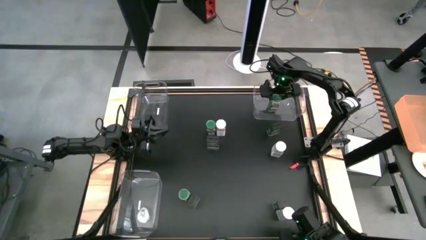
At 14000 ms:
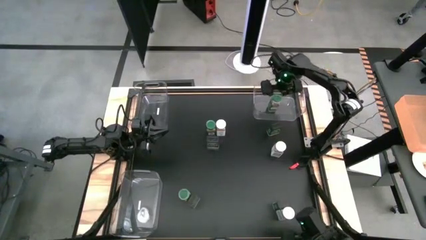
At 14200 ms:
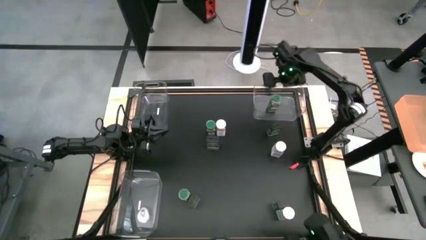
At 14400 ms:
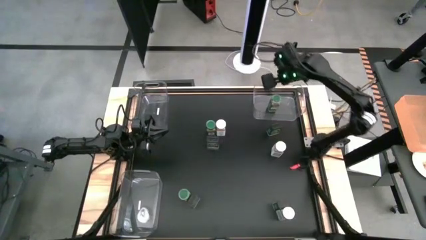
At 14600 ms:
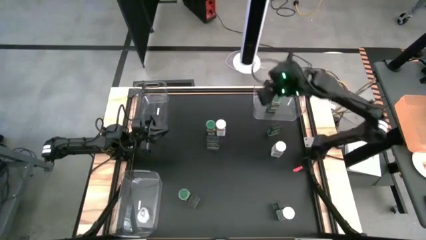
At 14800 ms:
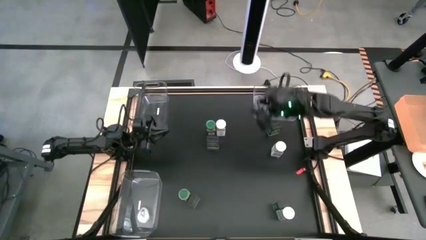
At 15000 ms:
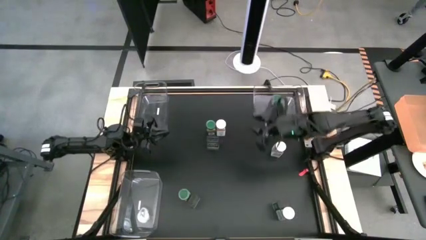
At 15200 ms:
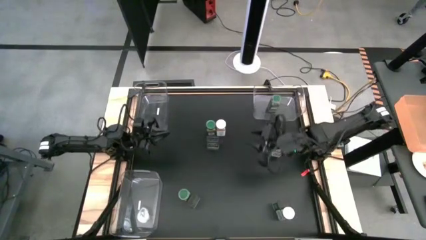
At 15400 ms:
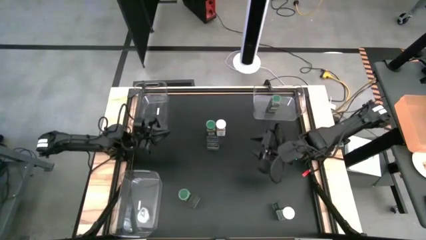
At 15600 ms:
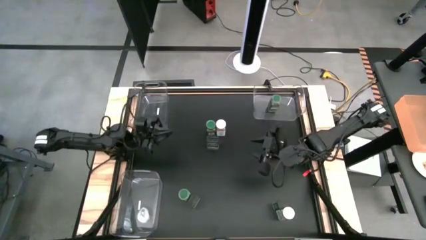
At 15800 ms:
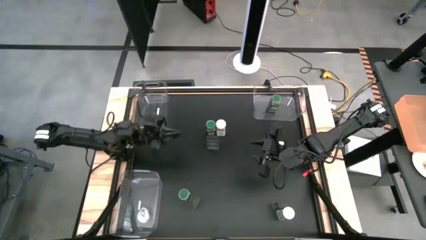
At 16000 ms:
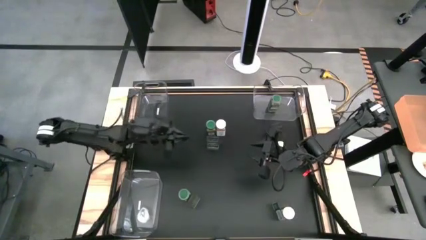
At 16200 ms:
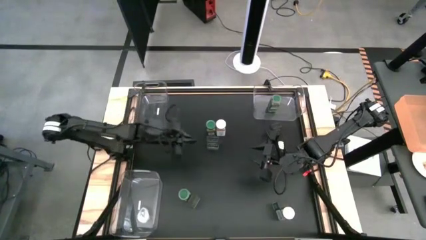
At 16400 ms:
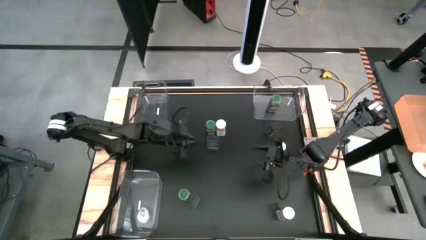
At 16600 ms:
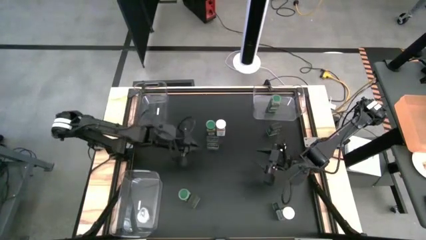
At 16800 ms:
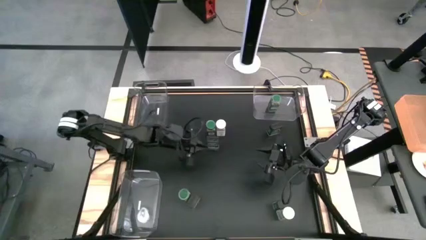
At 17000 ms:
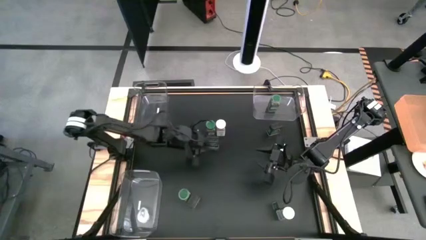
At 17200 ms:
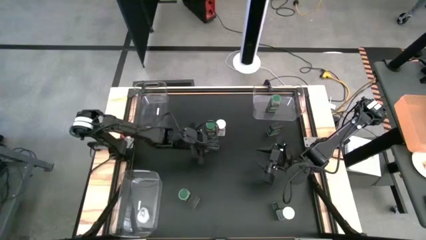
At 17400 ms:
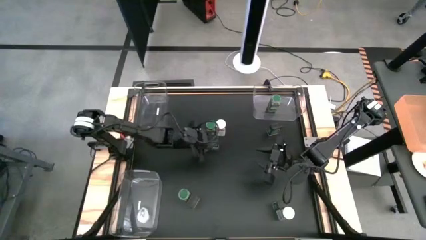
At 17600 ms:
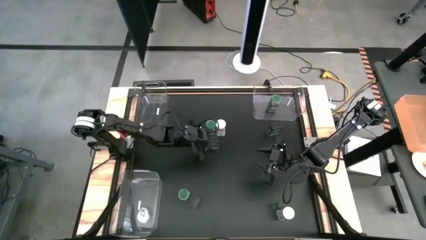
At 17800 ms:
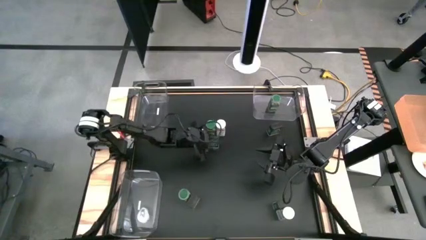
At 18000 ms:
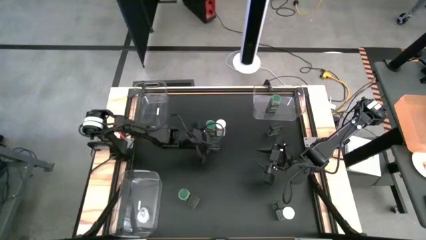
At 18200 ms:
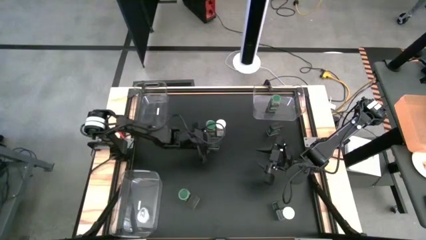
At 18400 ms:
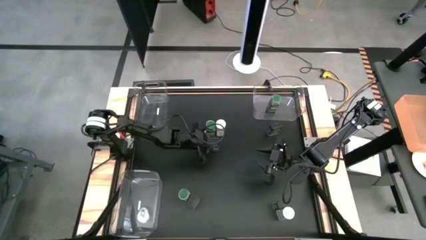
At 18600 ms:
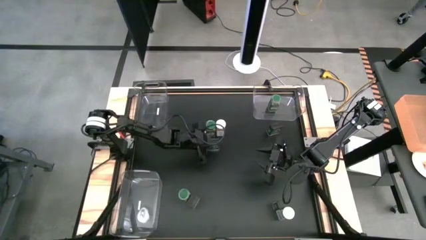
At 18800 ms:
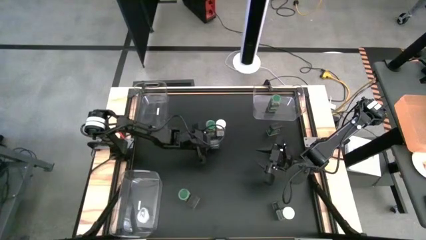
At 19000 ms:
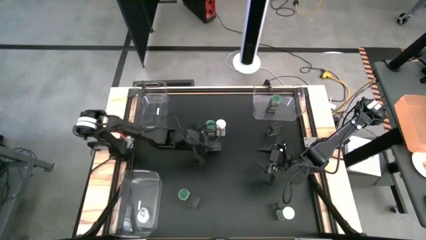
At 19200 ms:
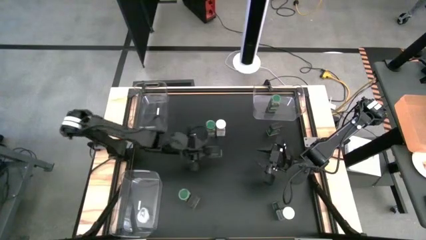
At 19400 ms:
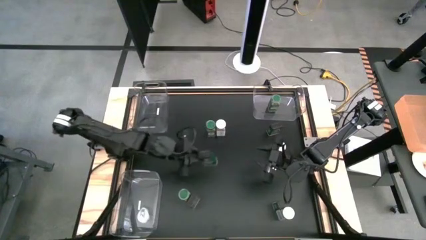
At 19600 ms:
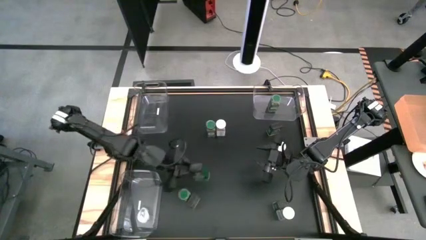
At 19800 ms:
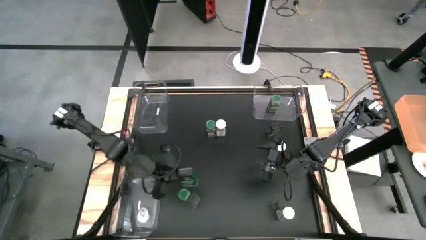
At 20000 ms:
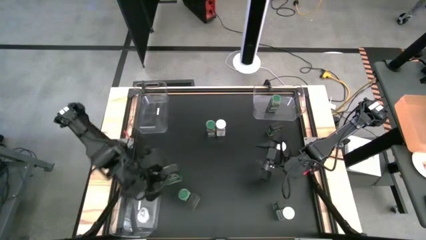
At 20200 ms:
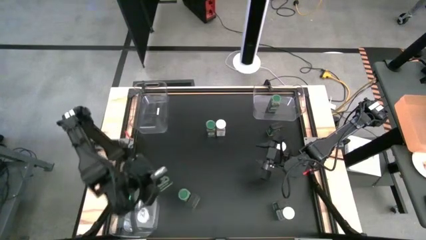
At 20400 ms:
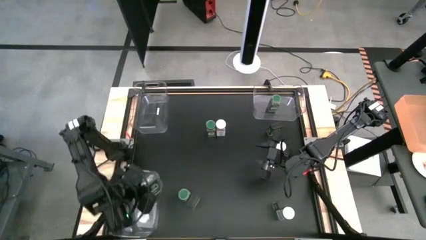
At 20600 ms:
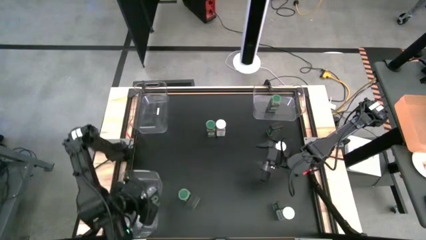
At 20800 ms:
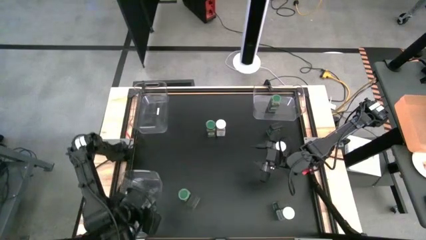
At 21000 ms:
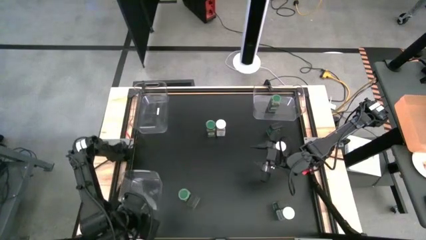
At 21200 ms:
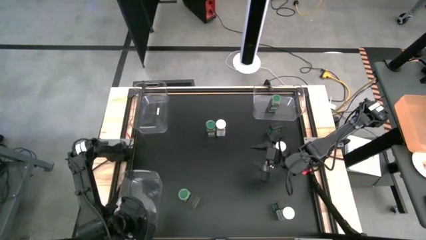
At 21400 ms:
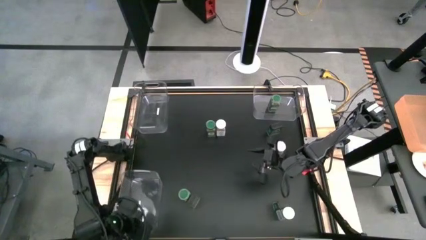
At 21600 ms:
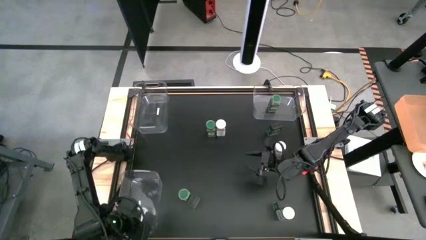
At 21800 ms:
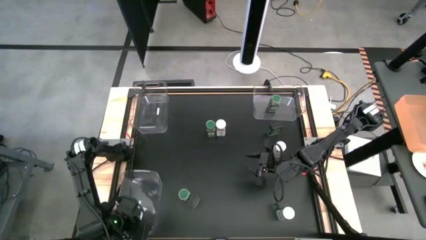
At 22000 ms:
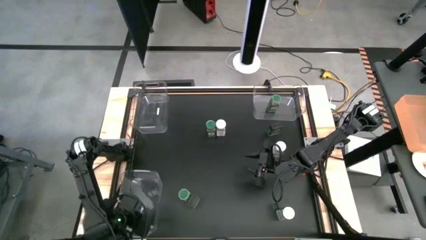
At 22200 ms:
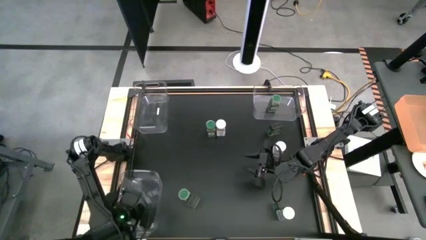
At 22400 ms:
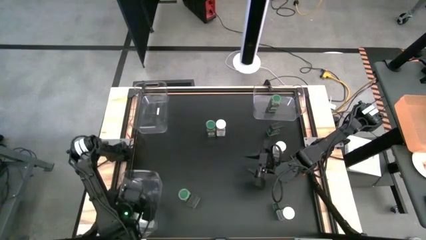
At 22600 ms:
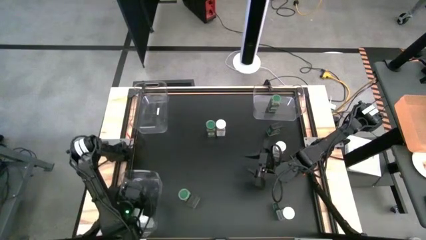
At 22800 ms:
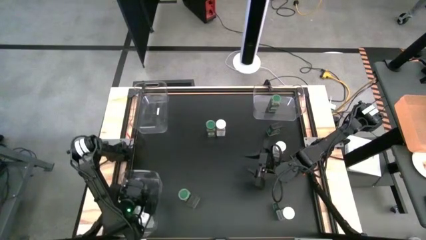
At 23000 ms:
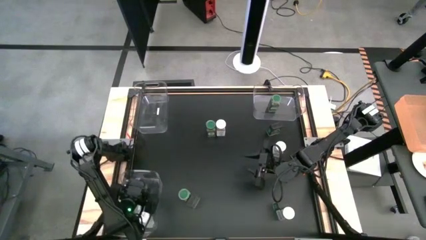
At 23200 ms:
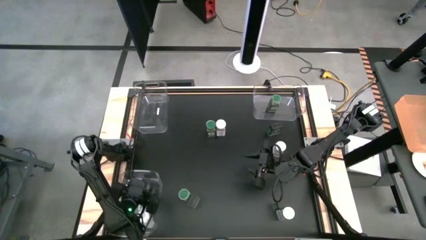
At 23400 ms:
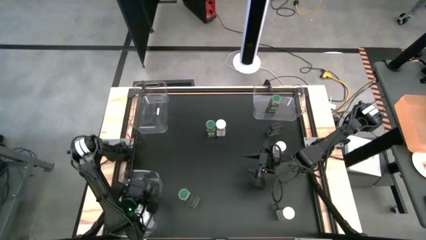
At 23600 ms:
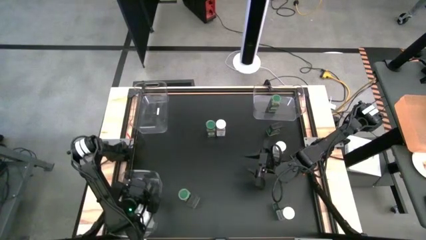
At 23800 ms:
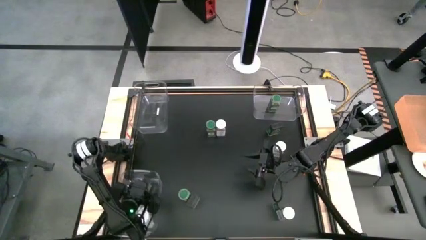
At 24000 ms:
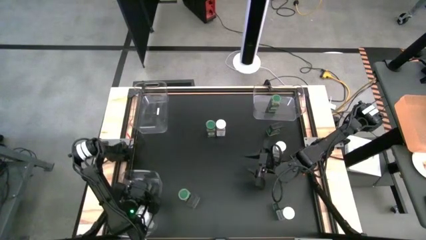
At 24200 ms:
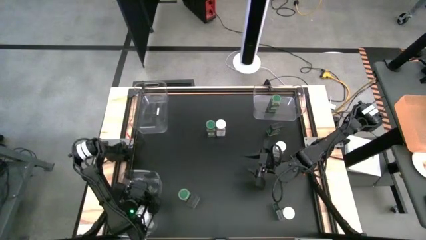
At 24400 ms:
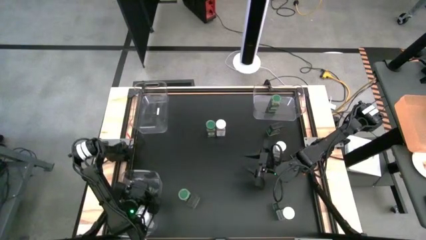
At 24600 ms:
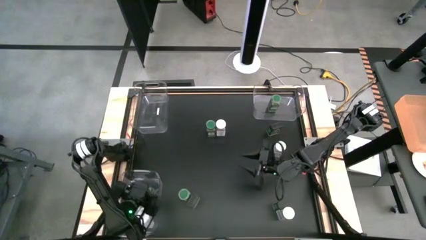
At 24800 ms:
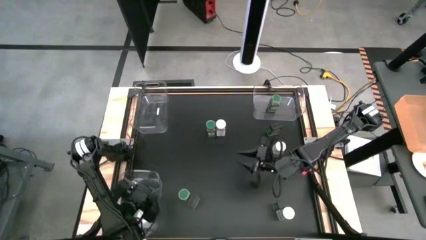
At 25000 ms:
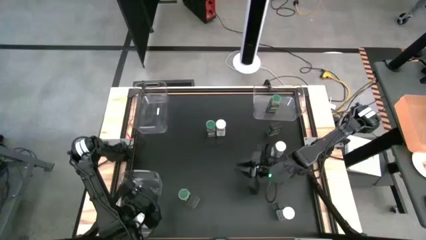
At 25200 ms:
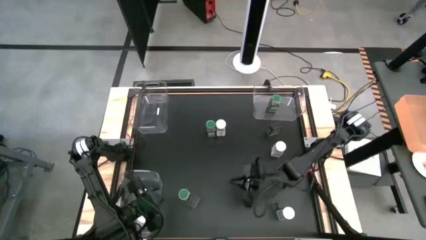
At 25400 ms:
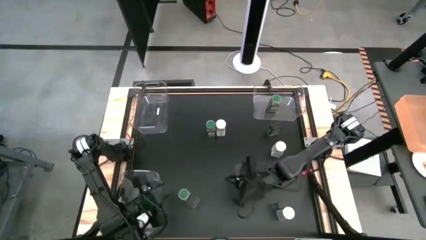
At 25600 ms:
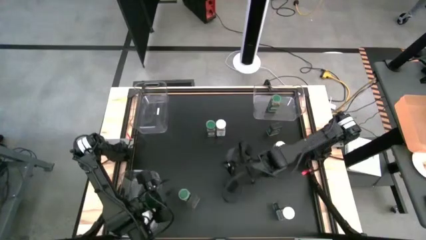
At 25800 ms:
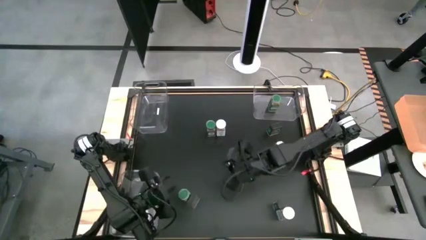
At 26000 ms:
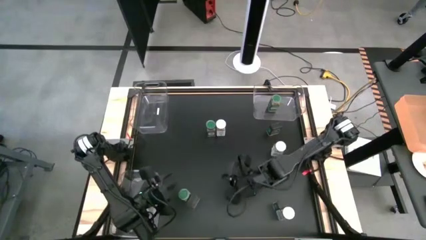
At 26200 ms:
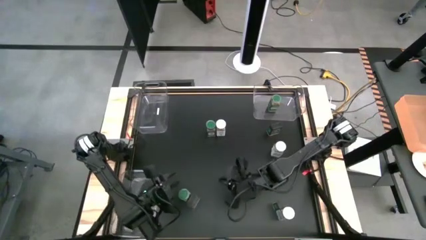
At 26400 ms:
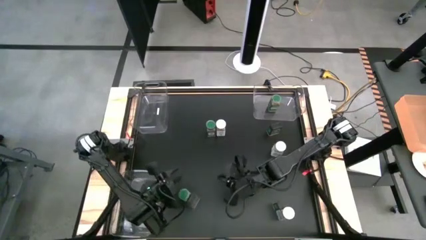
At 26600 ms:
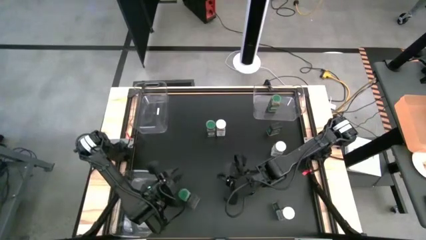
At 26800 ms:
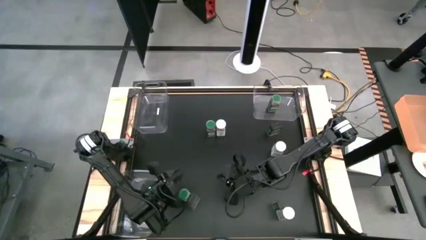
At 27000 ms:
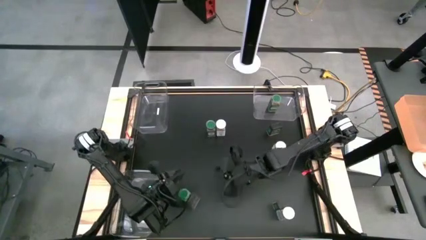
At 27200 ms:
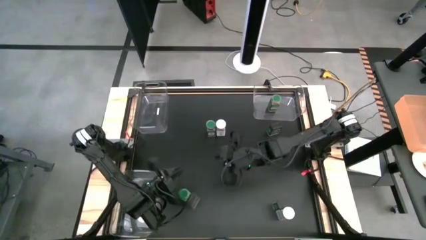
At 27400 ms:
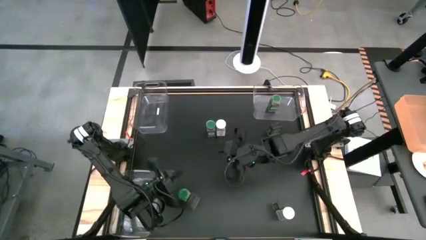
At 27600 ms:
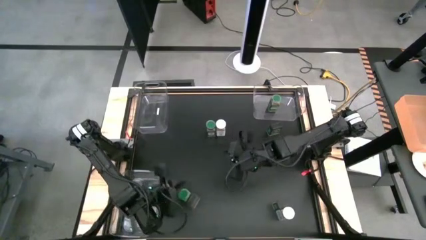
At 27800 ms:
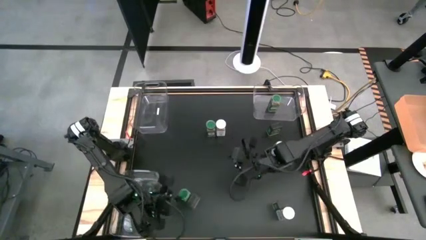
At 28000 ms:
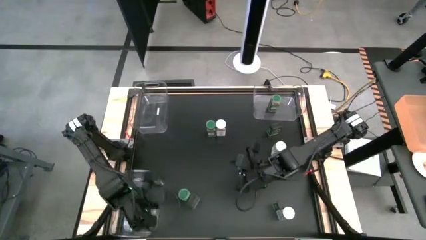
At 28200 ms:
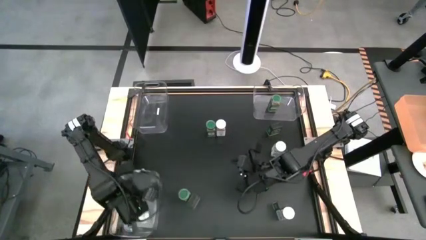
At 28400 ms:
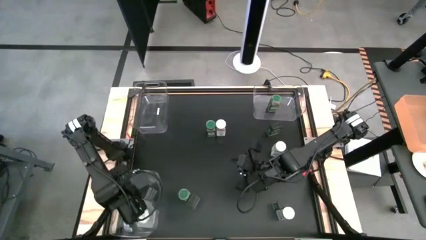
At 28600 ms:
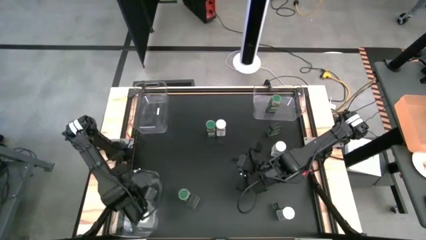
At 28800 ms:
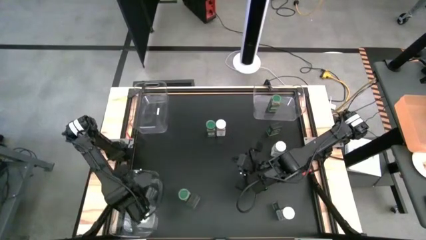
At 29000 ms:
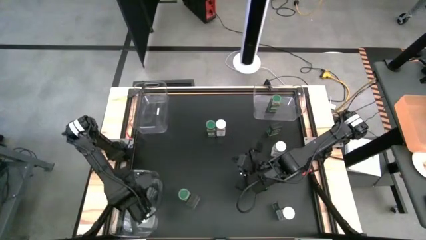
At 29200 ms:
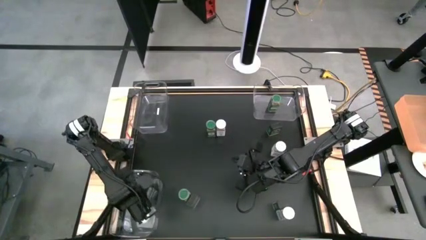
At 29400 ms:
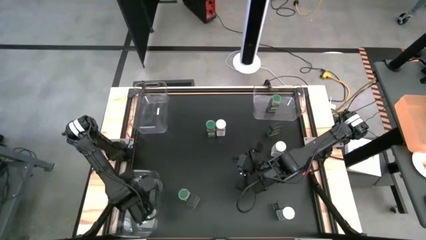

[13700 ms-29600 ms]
Task: Sort spices by type
Put the top left black seasoning can into the bottom transparent bin
